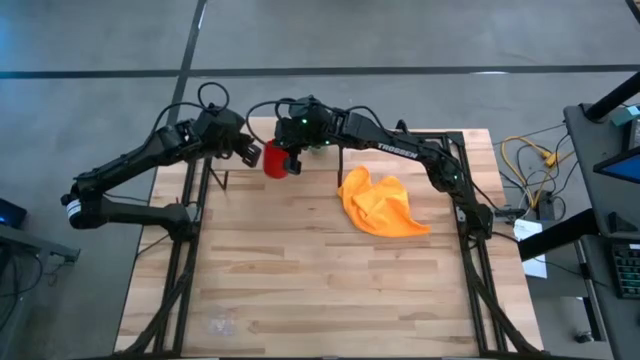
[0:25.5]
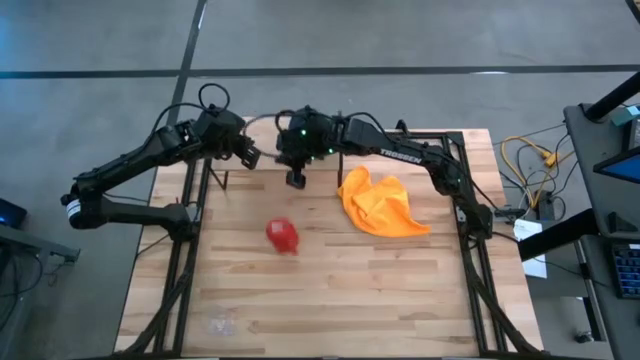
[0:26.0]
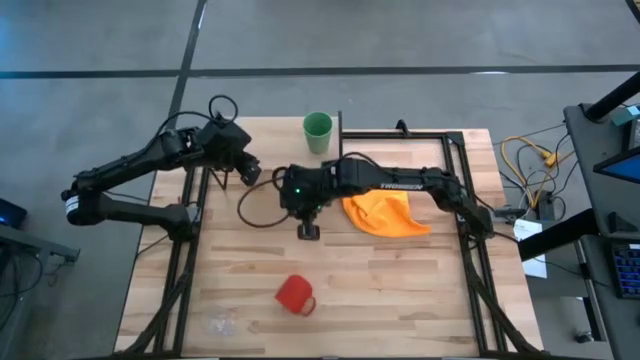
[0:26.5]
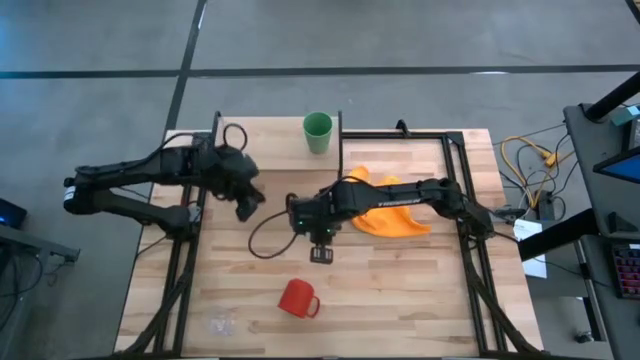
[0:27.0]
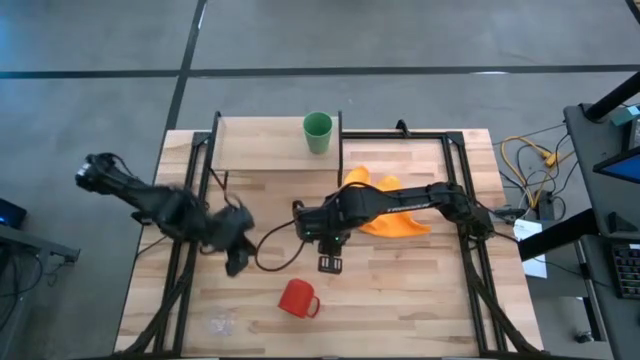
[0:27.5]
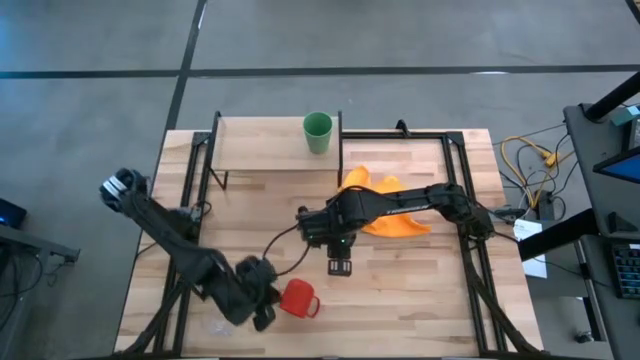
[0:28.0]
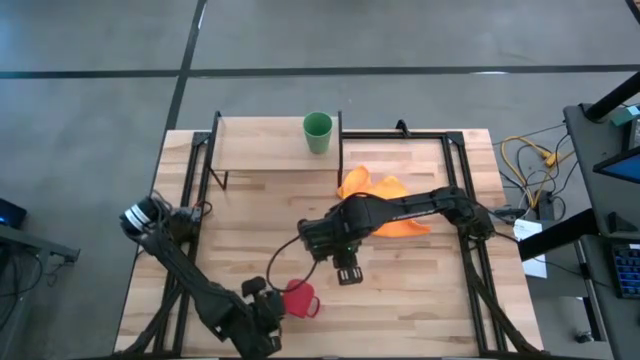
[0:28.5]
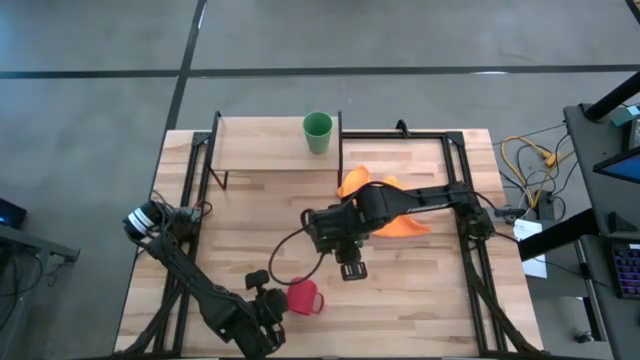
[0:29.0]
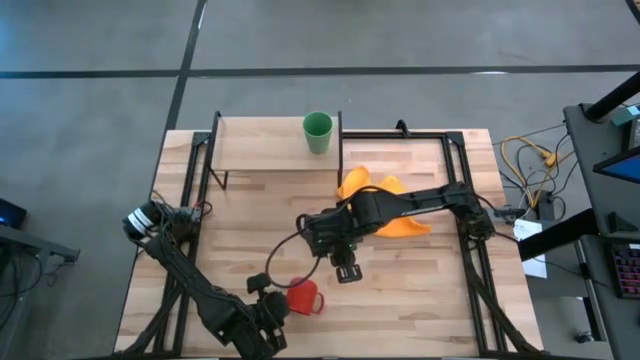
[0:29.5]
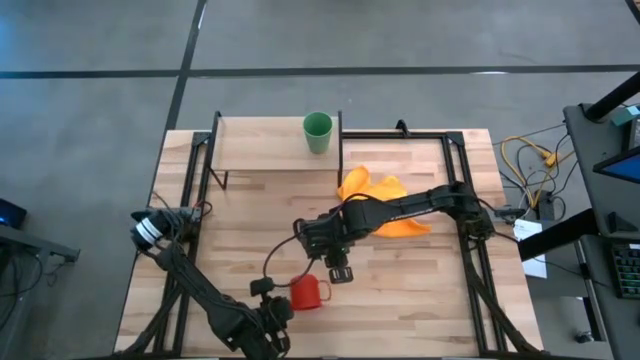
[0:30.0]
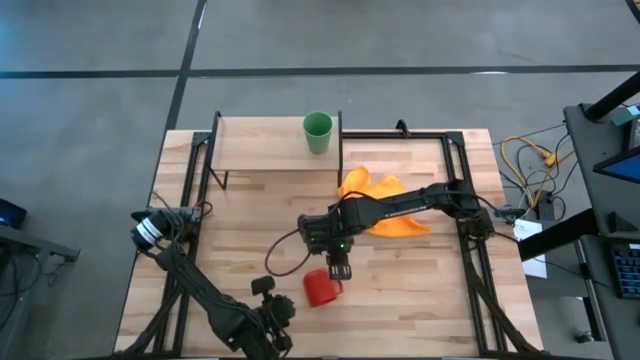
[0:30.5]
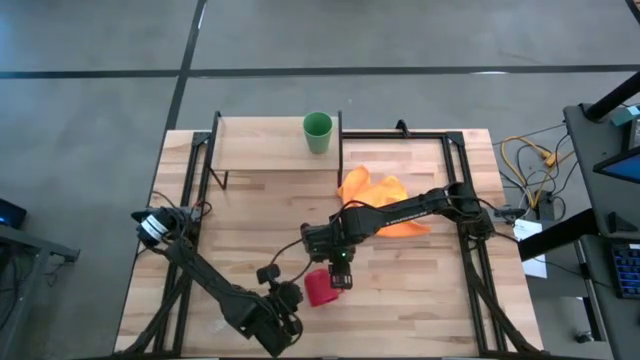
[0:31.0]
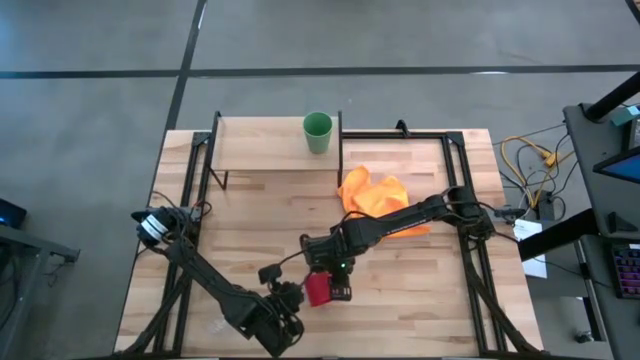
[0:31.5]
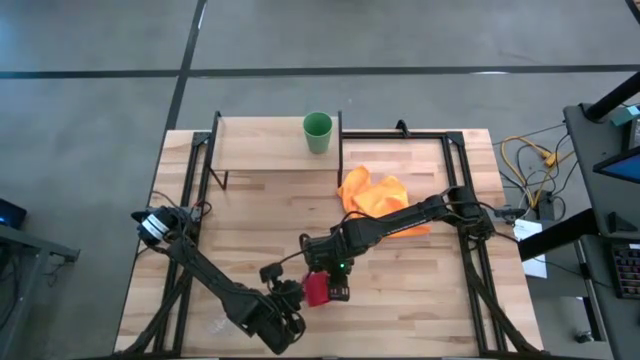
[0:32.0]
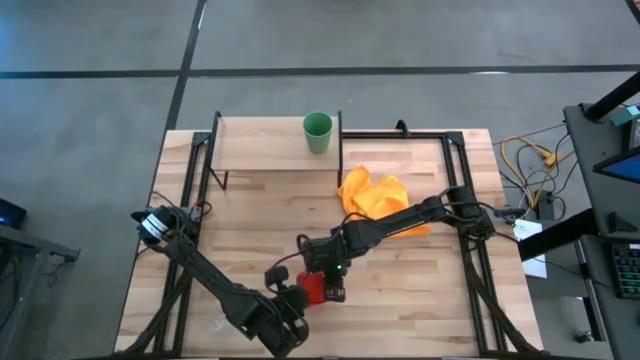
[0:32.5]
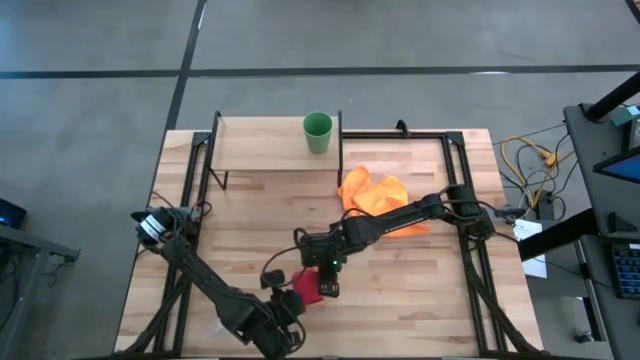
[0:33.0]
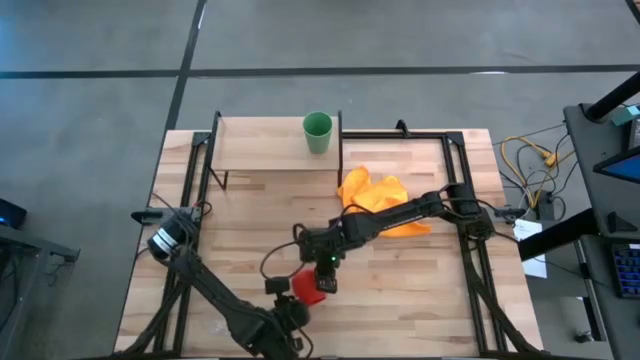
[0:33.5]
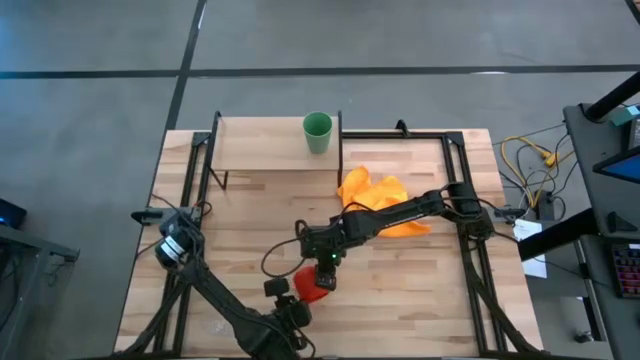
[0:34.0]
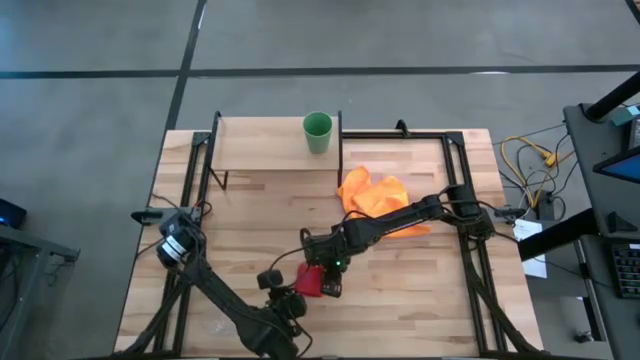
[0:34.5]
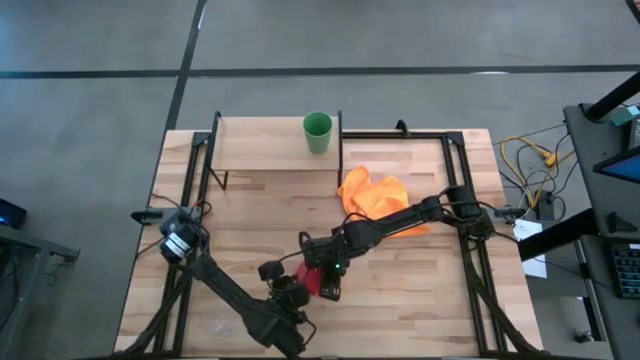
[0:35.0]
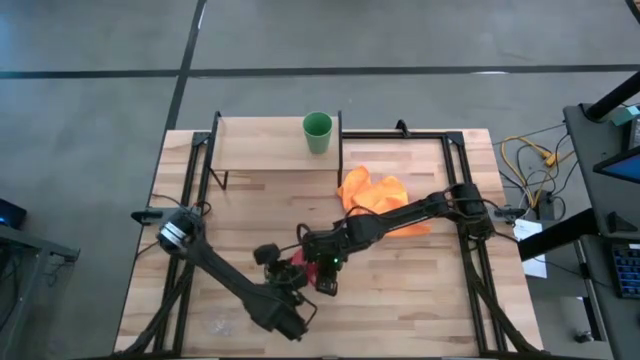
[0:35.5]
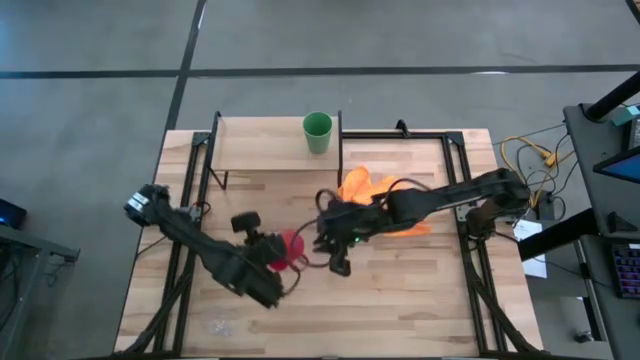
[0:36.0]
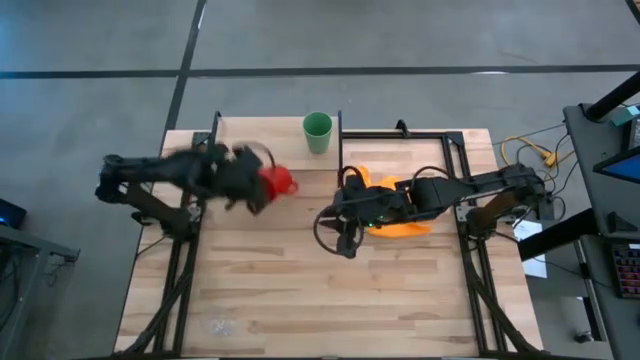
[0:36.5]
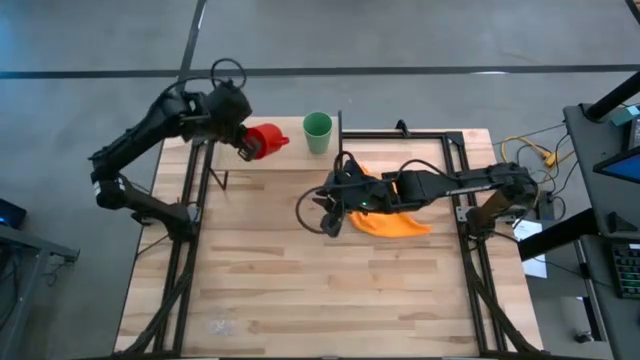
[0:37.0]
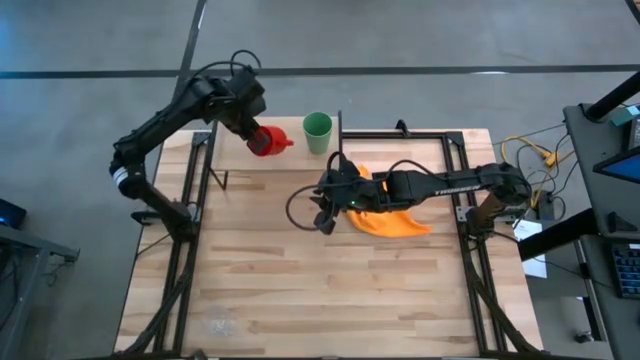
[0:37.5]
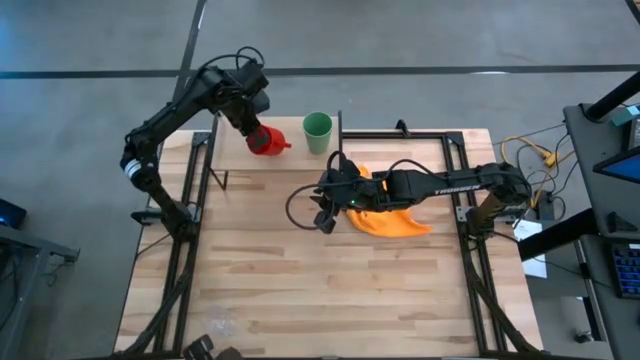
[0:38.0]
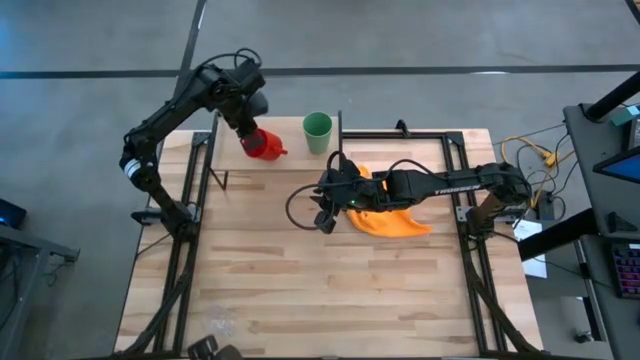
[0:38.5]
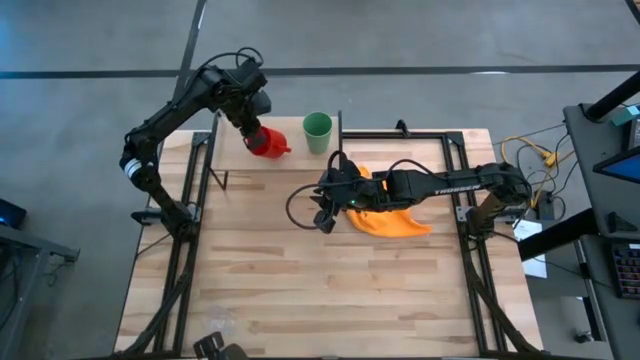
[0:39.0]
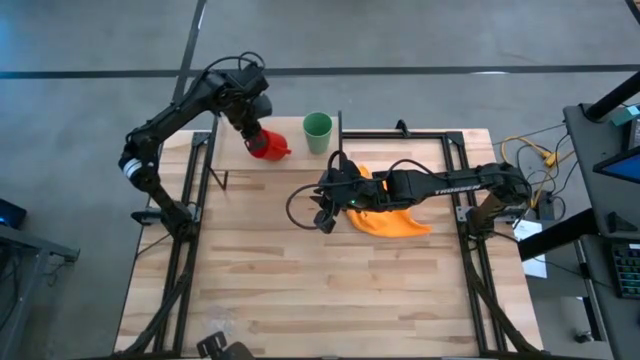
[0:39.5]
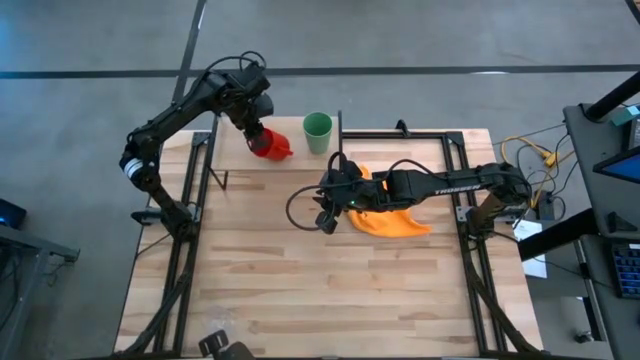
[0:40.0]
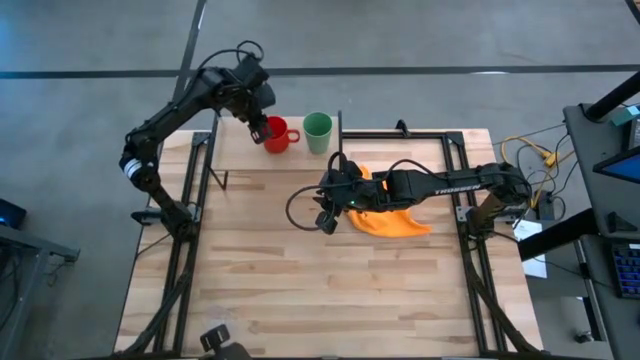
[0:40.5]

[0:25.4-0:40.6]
Task: Stack small to large cups/mugs on shelf
Put the red mug on the shelf

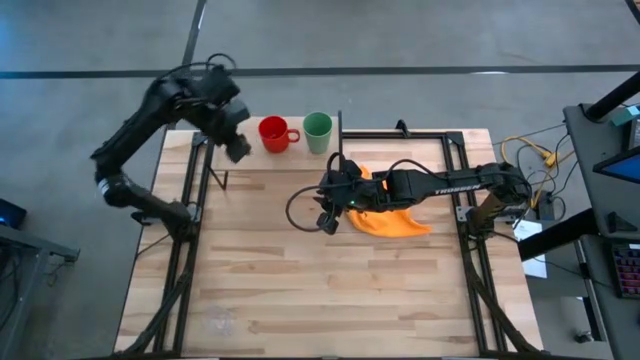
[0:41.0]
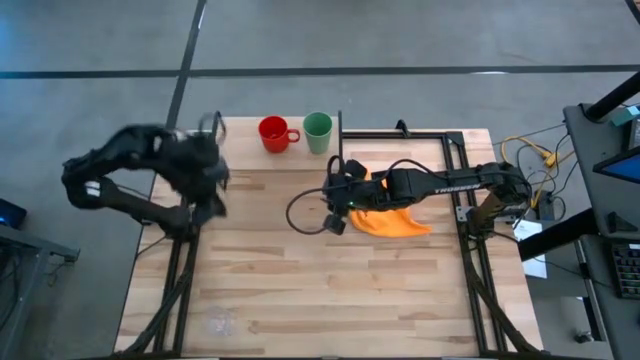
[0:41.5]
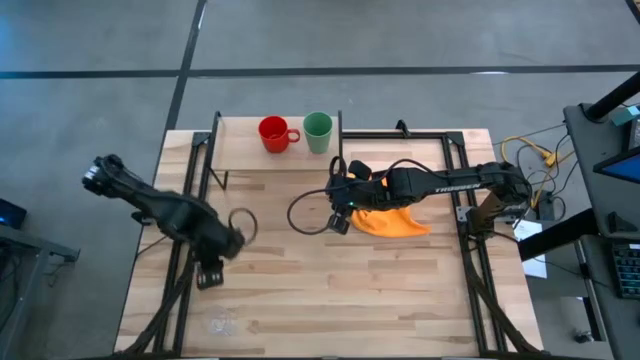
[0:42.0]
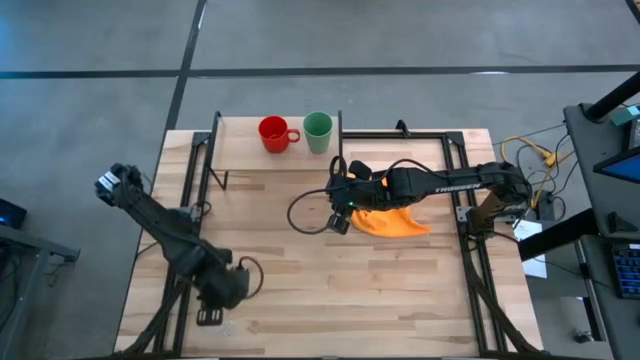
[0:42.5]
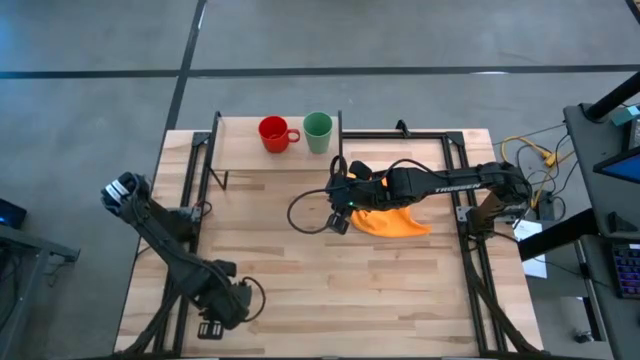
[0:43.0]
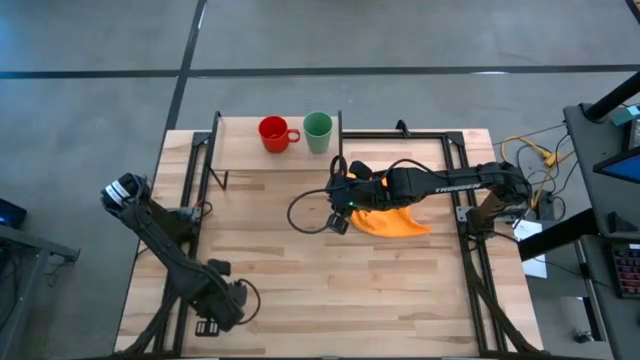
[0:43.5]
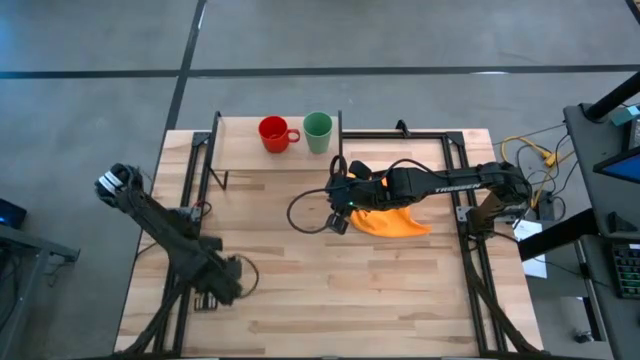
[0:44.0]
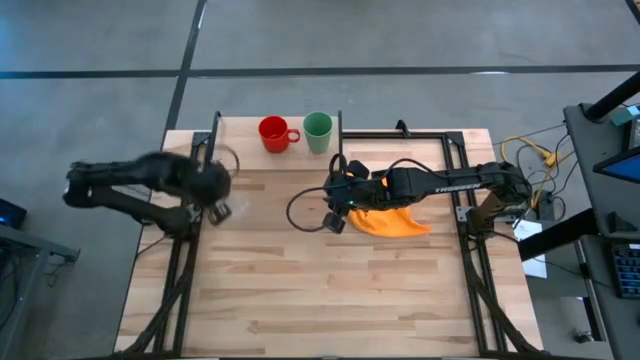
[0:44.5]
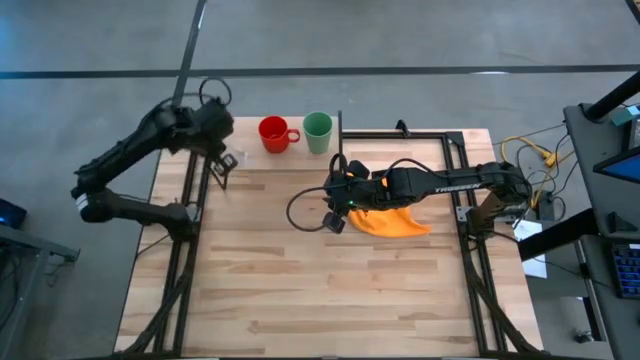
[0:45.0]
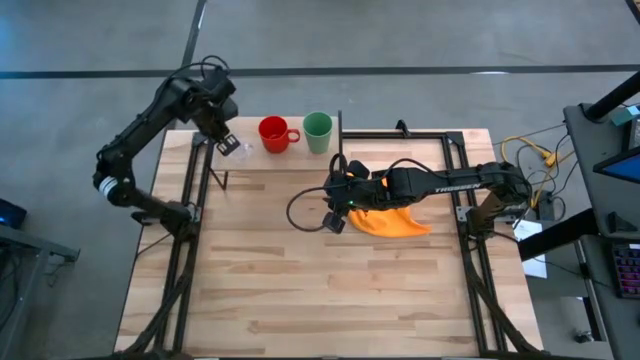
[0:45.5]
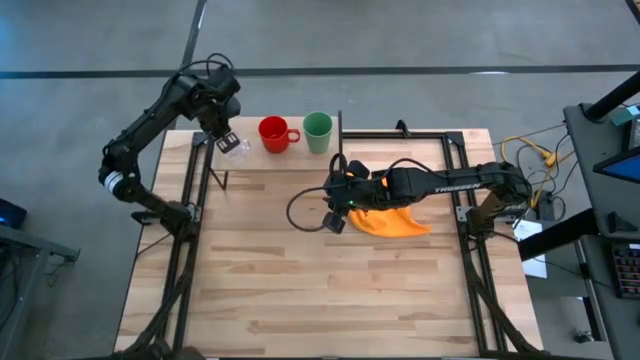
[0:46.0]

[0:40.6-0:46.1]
Put the transparent mug on the shelf
